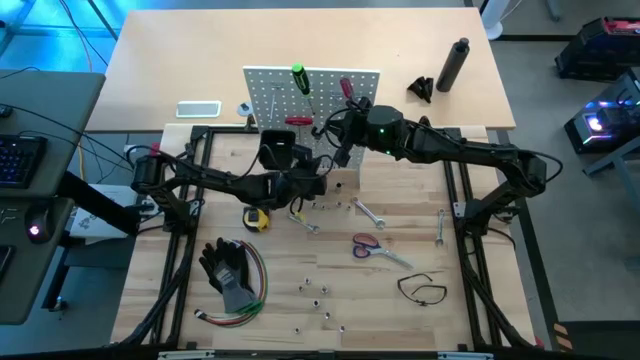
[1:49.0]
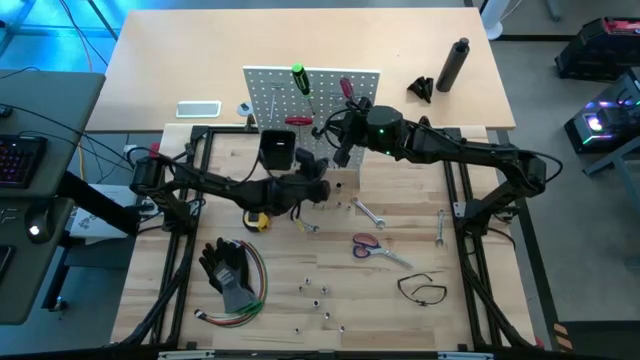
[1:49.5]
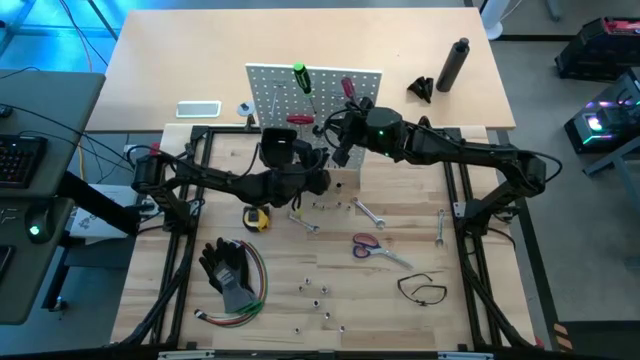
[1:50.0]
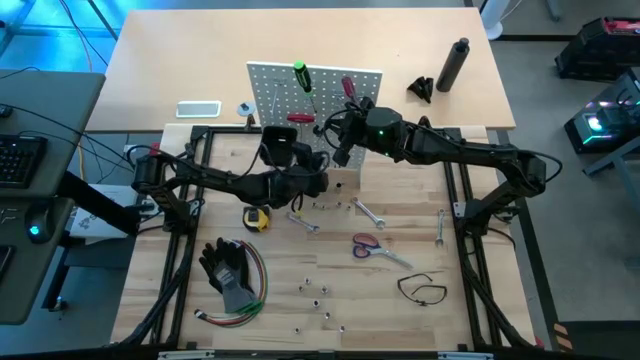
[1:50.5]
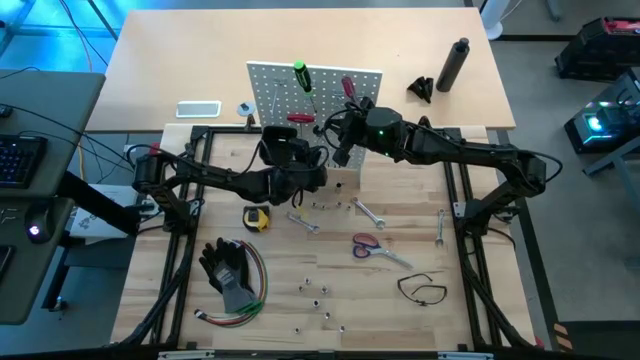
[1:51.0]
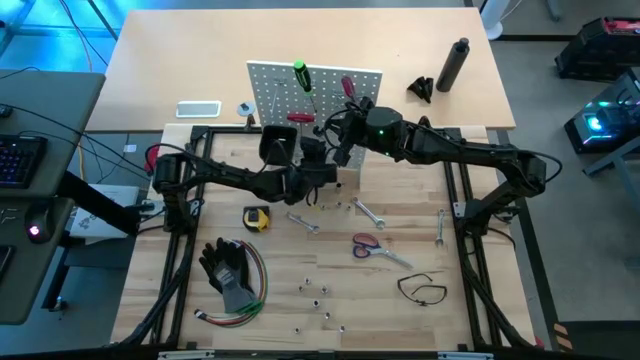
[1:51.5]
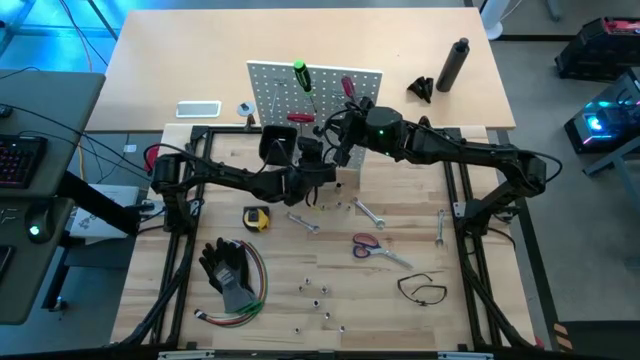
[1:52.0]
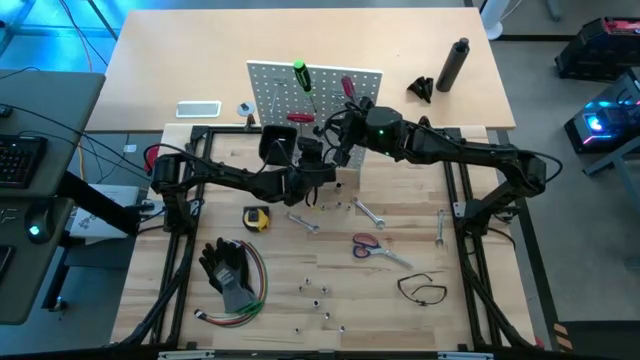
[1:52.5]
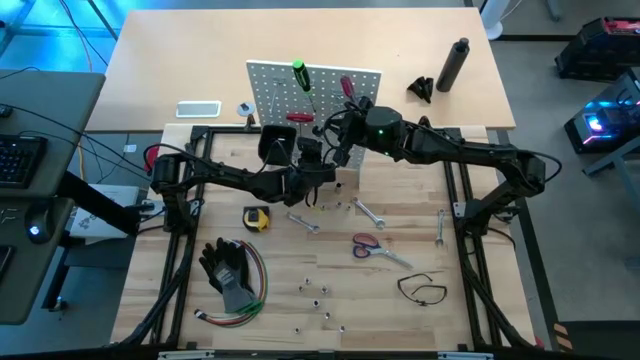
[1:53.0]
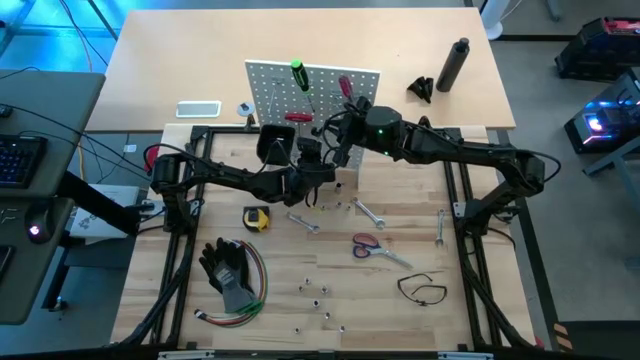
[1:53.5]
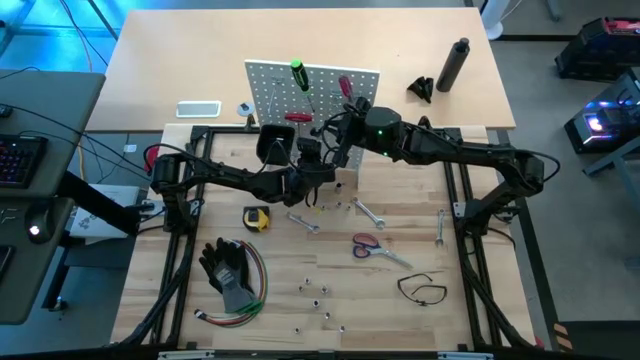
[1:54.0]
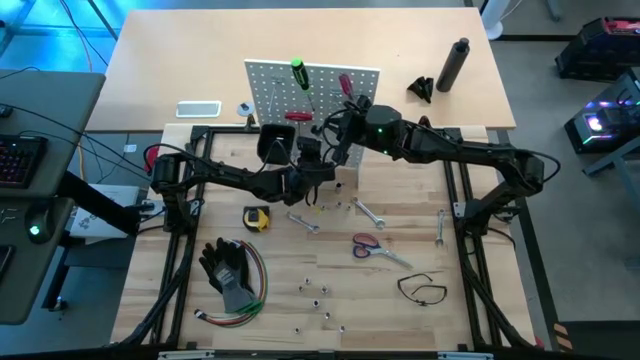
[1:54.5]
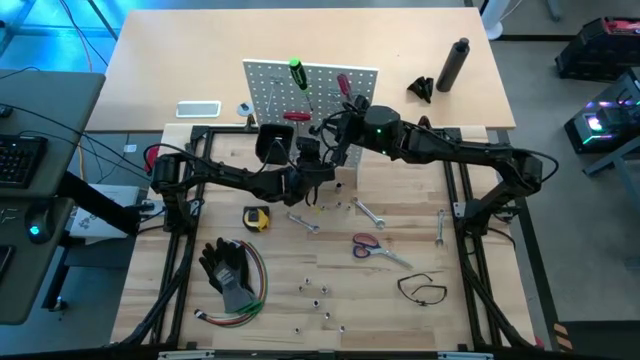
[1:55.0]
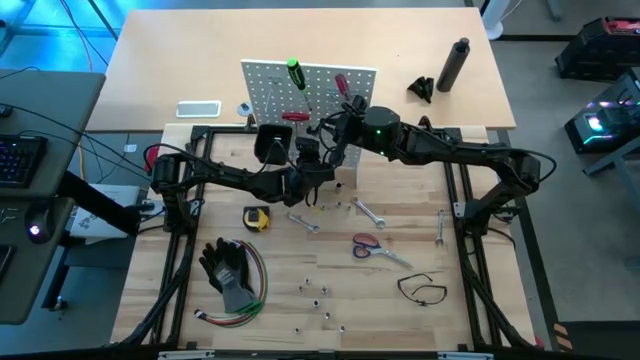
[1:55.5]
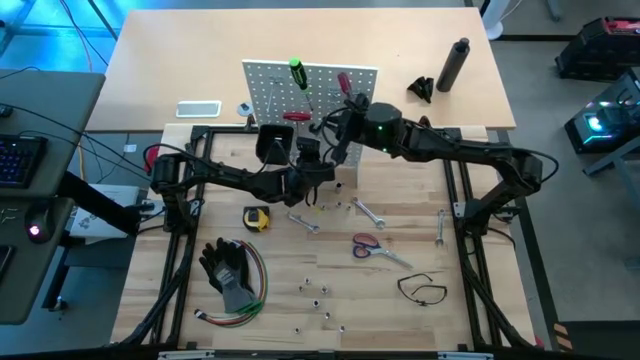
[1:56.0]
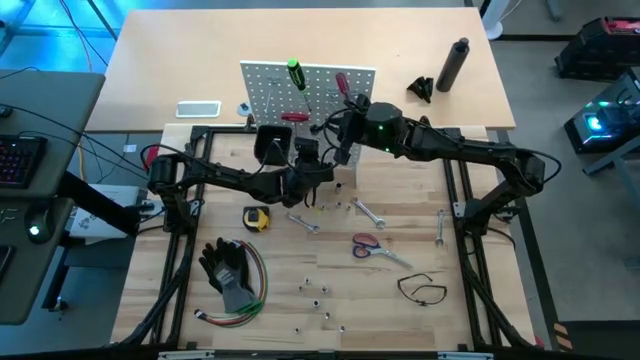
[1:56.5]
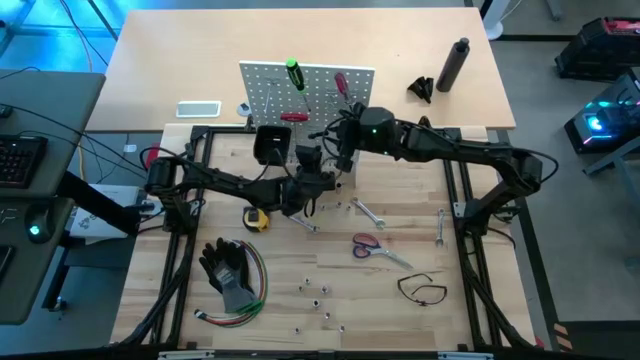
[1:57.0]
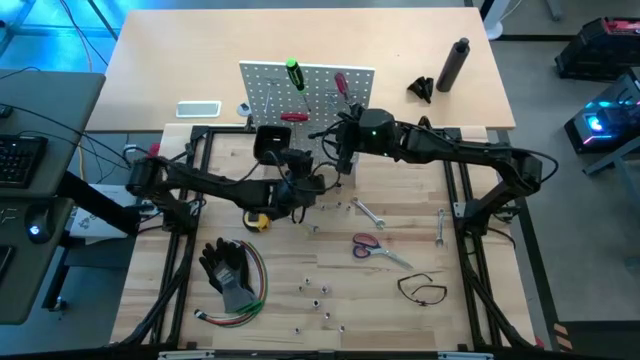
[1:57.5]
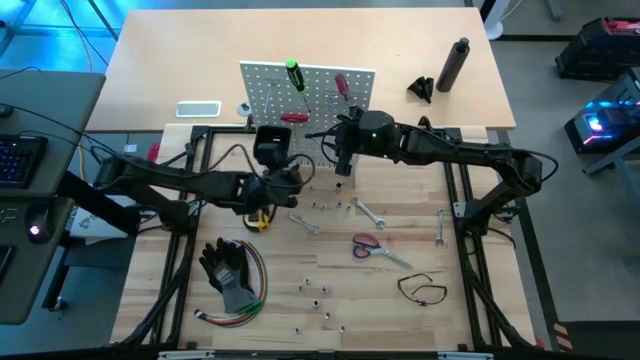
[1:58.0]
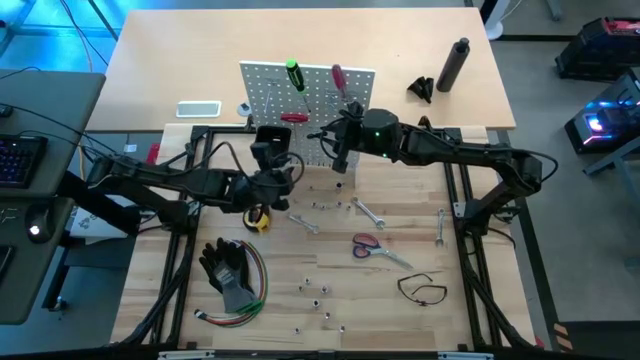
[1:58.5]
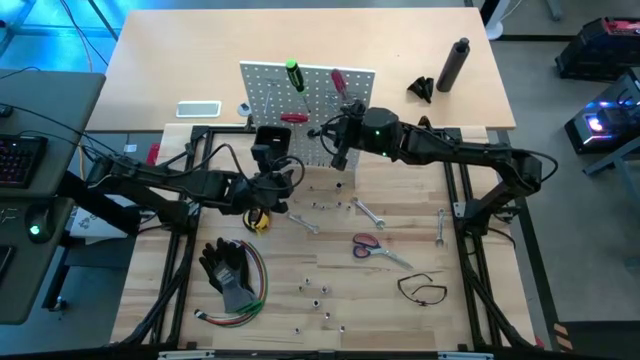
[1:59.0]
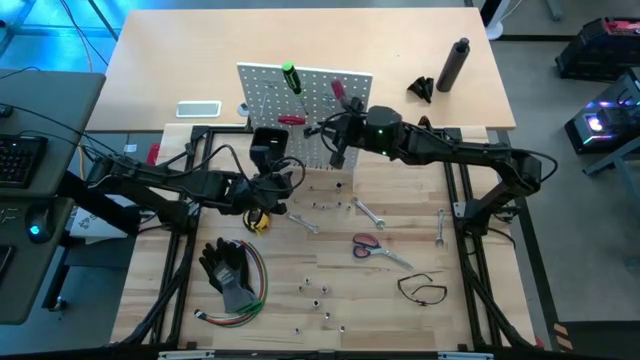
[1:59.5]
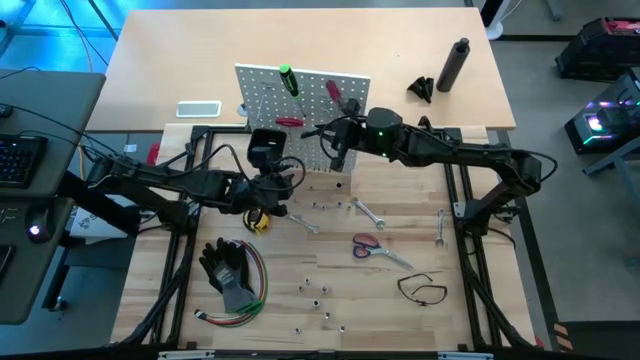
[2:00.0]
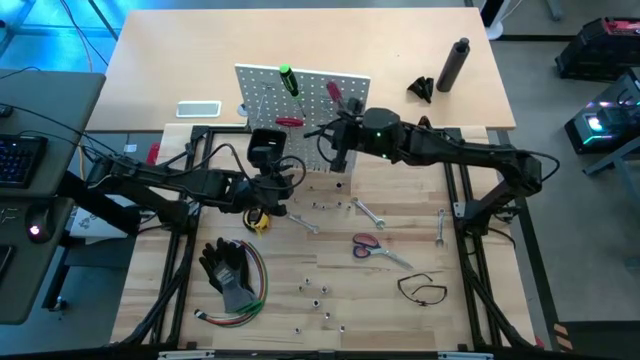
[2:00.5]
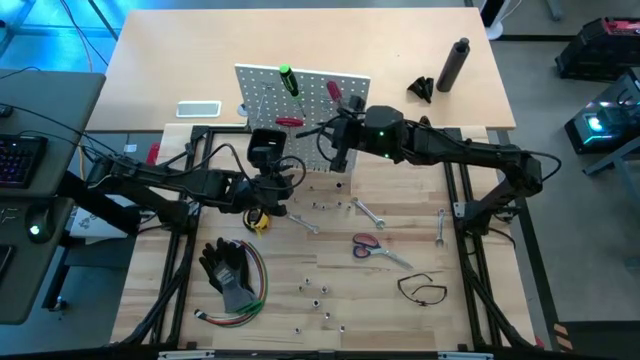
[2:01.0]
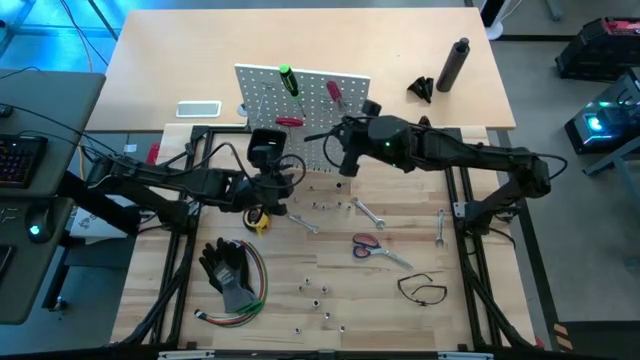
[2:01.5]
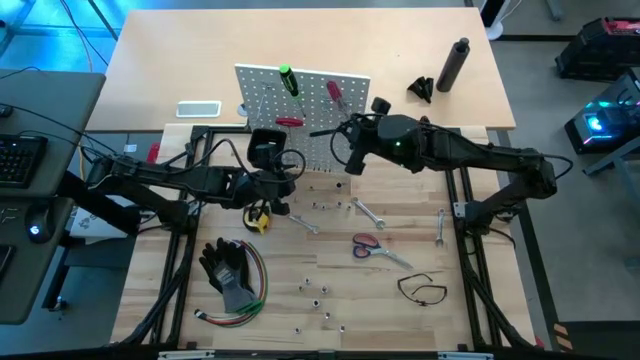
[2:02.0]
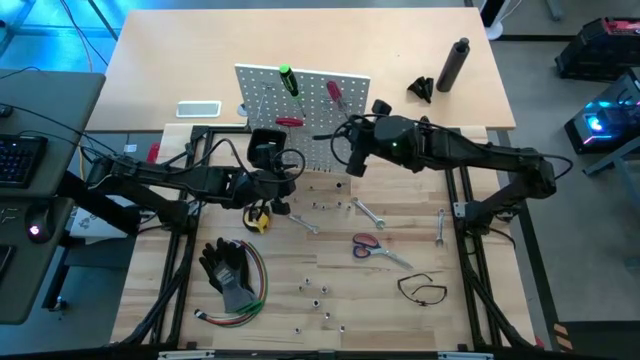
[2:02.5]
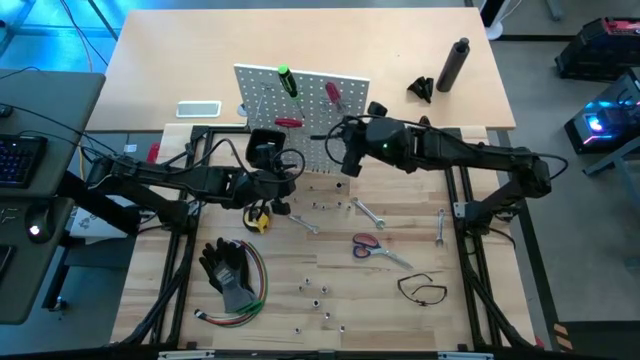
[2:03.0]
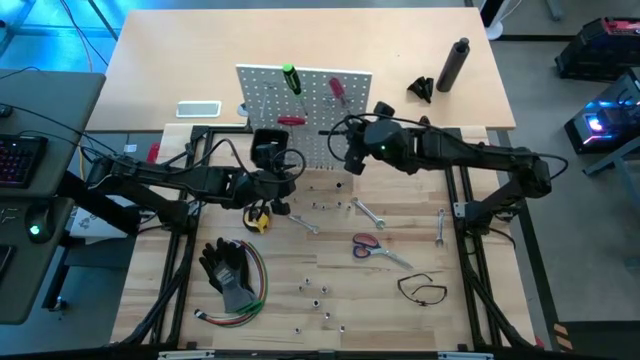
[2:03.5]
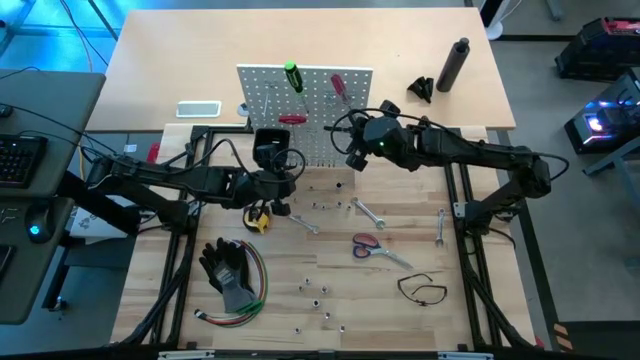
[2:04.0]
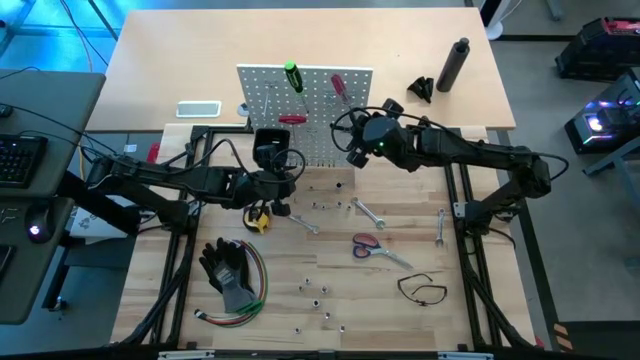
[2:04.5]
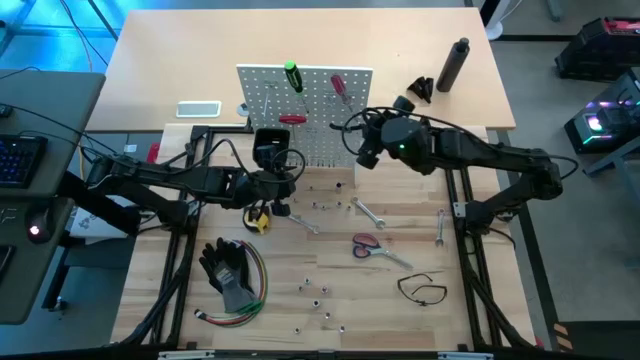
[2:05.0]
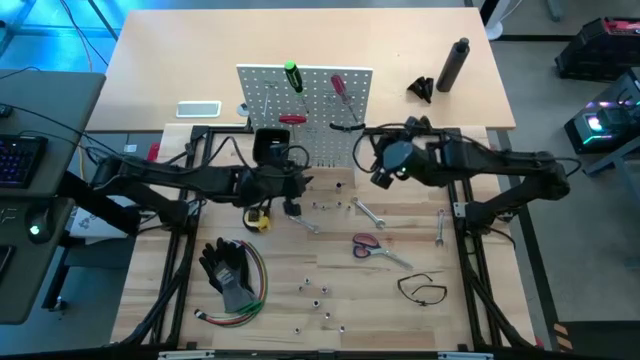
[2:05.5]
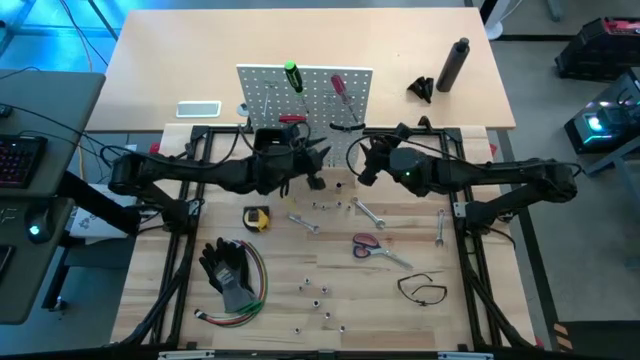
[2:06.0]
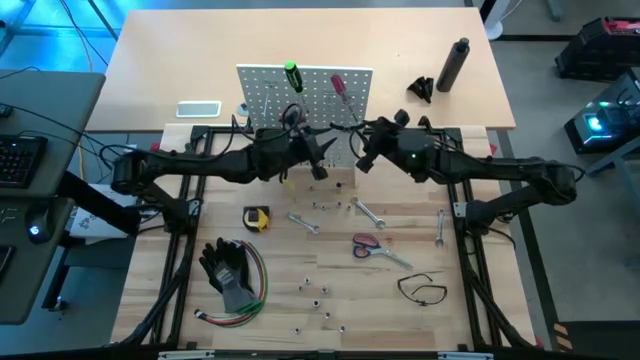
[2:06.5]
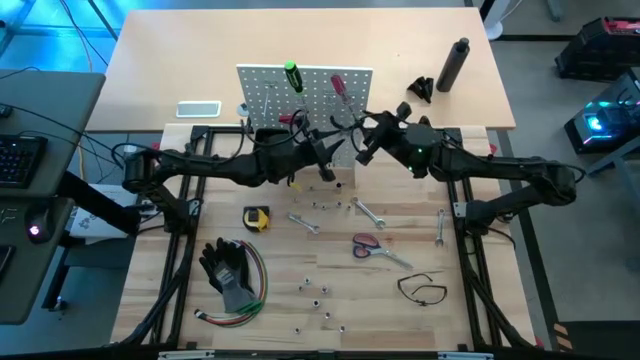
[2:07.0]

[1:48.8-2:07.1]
Task: Hang tools onto peg board
Hang the black pliers on the white peg board

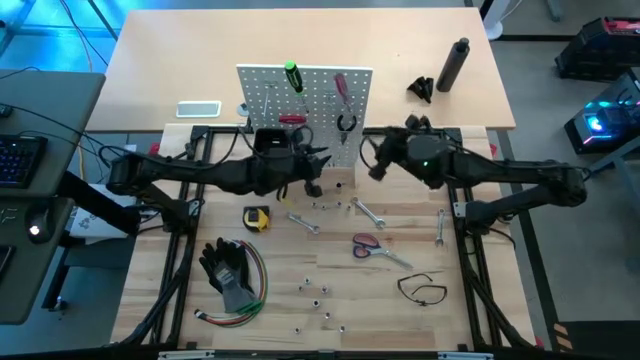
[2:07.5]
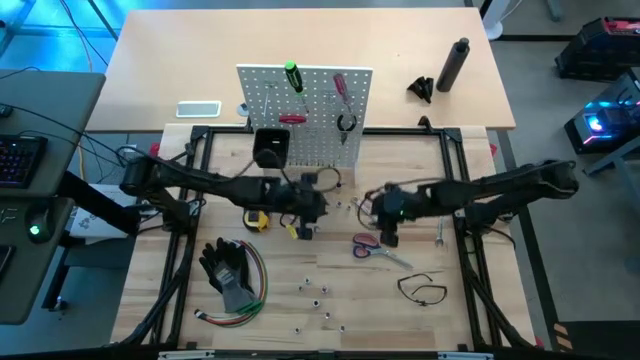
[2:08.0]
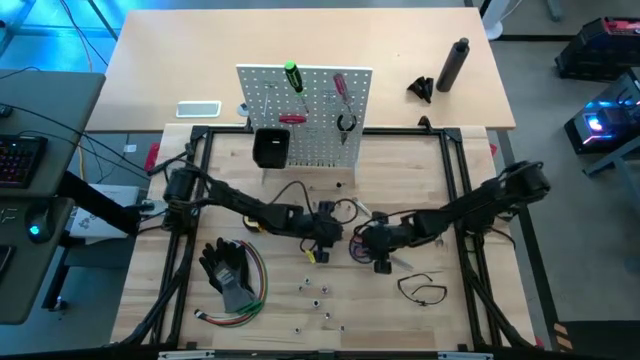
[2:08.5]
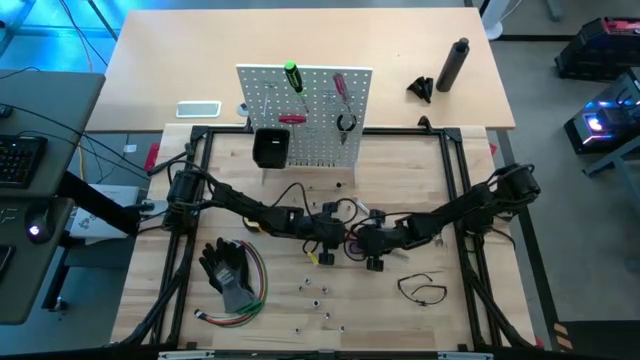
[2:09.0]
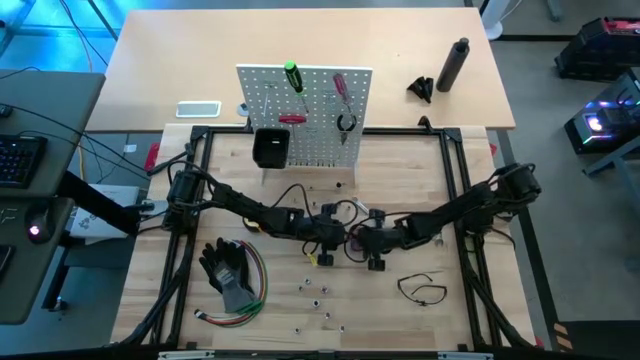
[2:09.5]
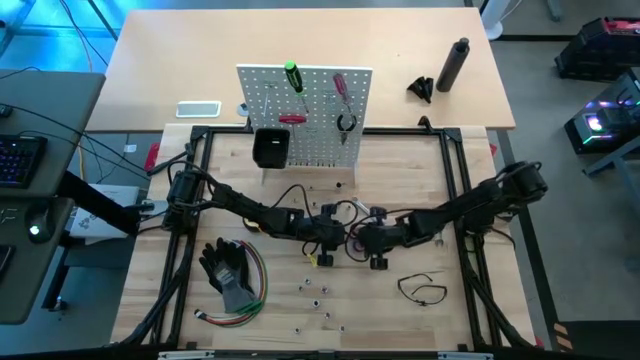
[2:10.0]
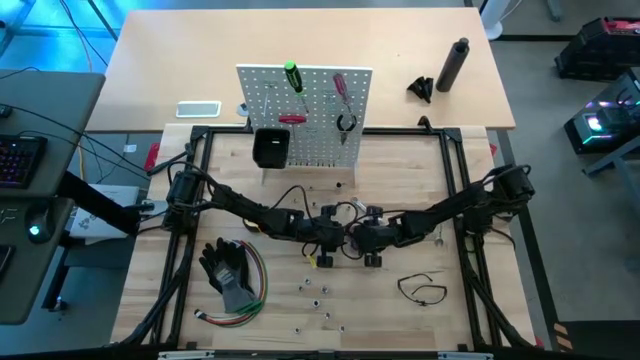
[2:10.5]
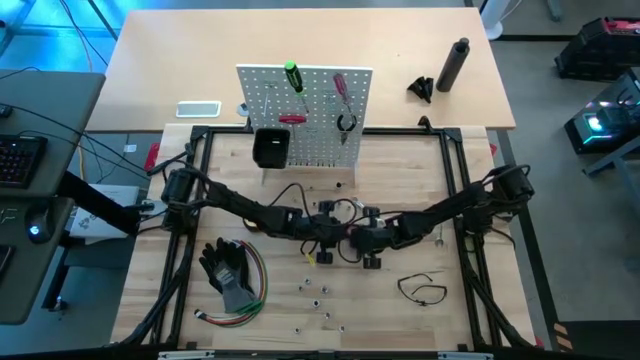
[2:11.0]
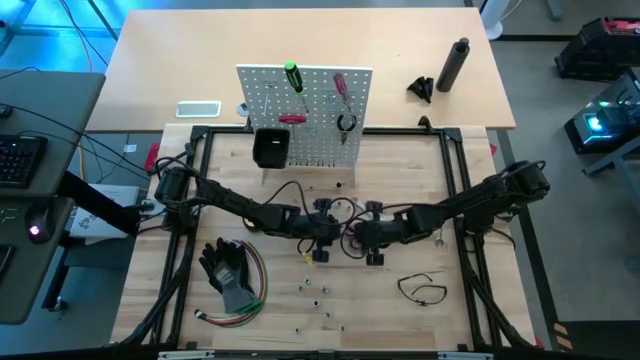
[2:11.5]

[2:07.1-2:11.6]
Hang the blue scissors on the white peg board
